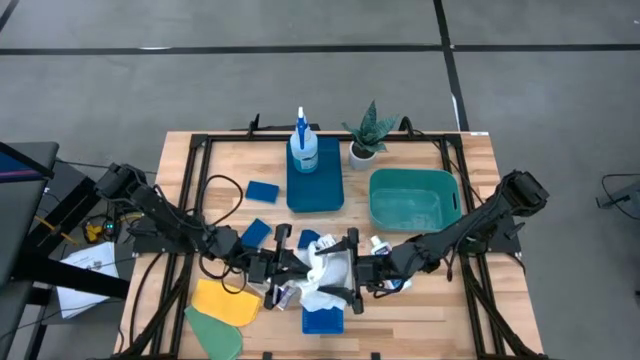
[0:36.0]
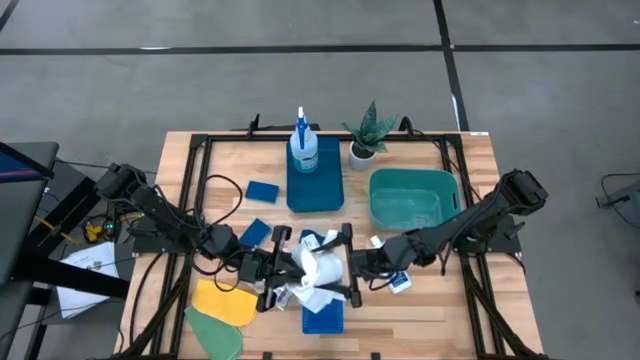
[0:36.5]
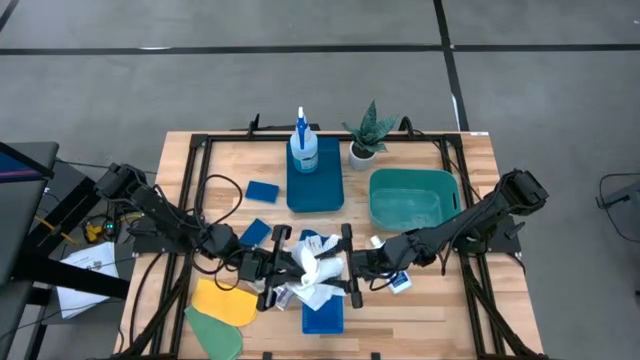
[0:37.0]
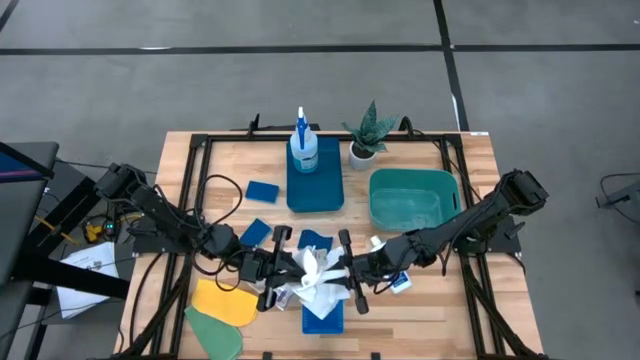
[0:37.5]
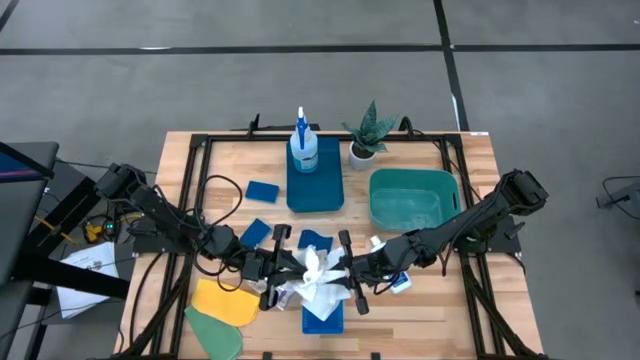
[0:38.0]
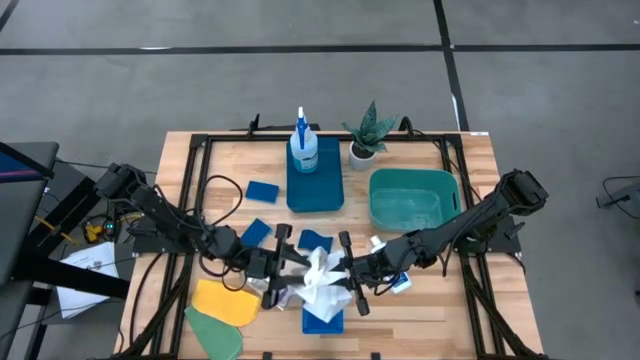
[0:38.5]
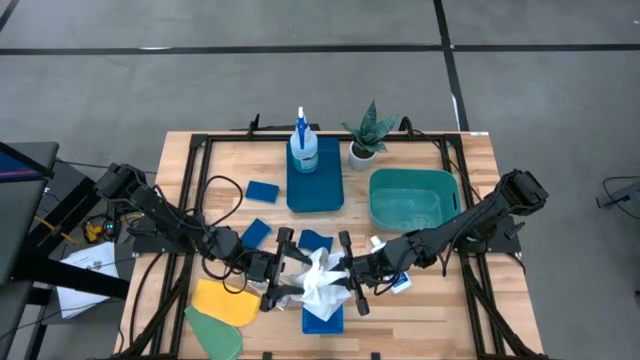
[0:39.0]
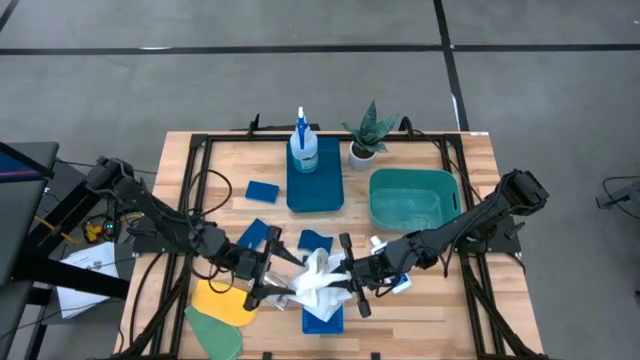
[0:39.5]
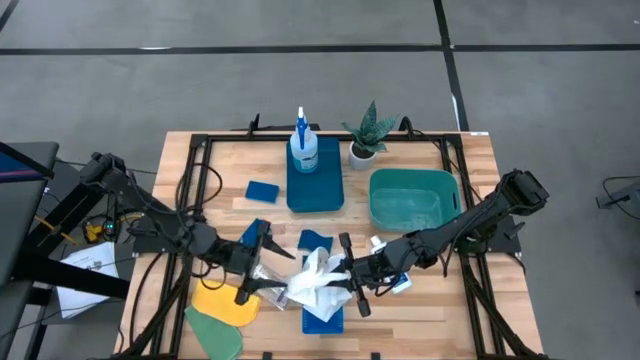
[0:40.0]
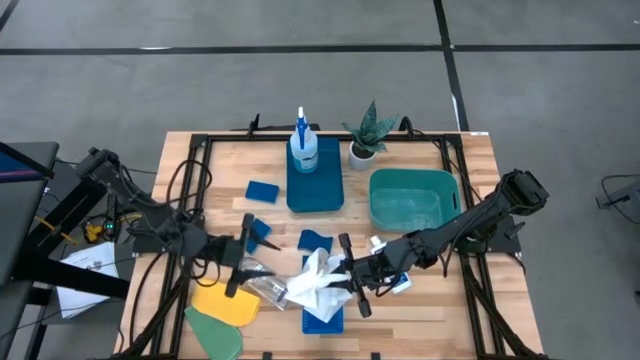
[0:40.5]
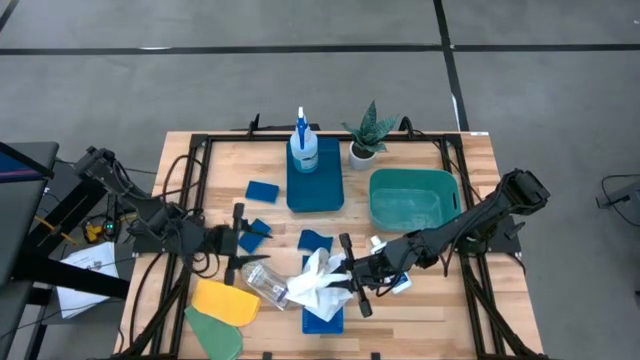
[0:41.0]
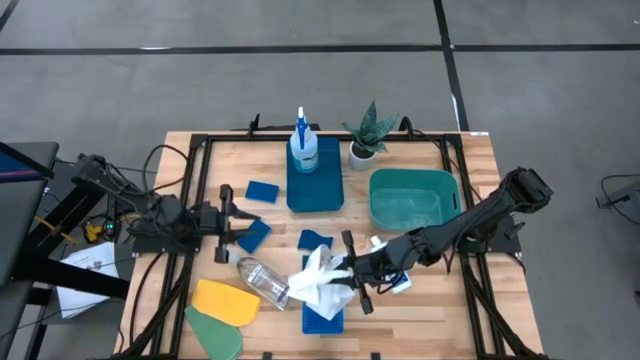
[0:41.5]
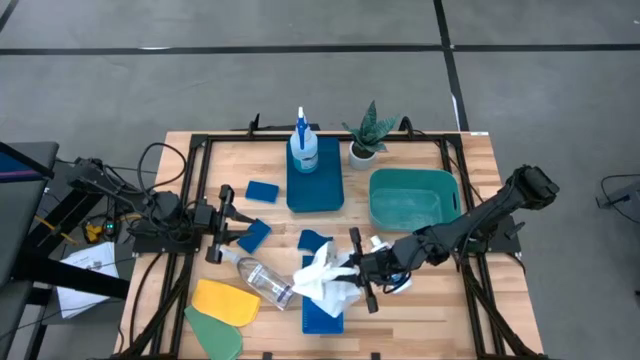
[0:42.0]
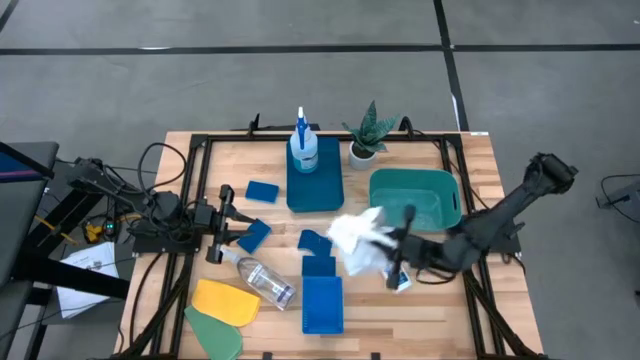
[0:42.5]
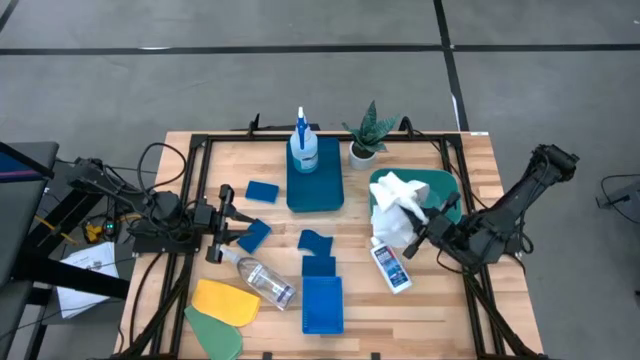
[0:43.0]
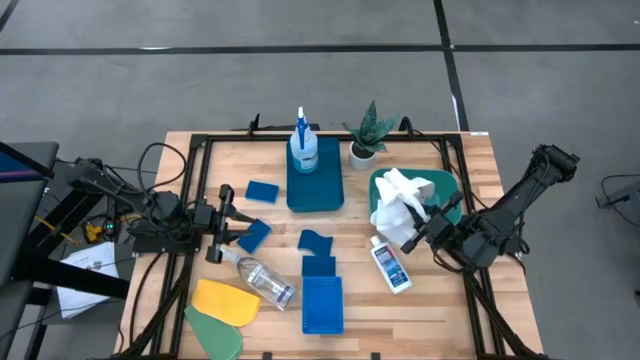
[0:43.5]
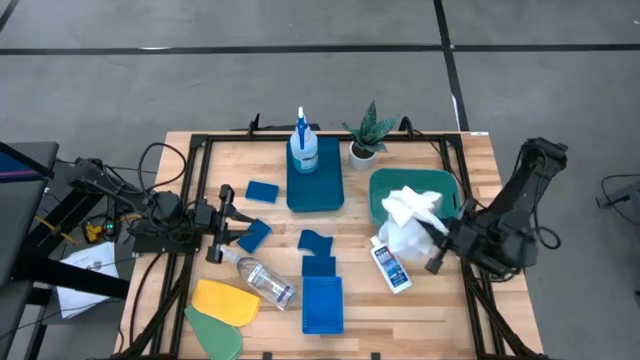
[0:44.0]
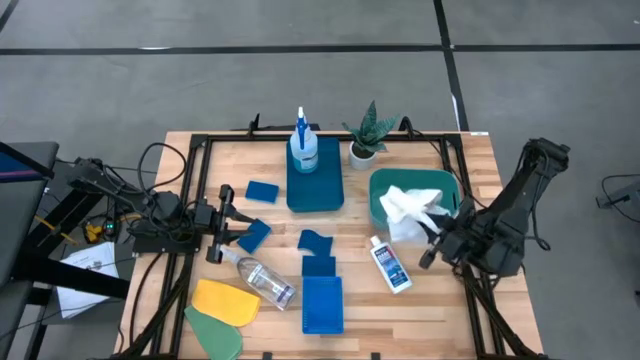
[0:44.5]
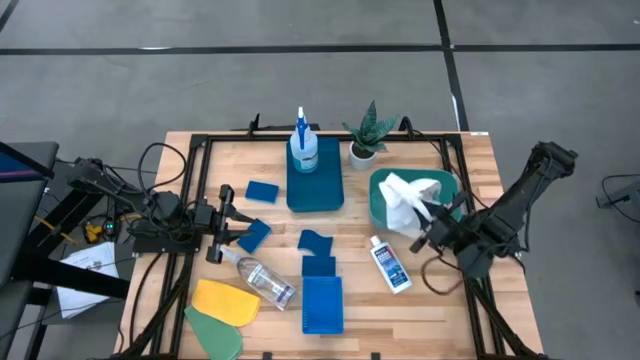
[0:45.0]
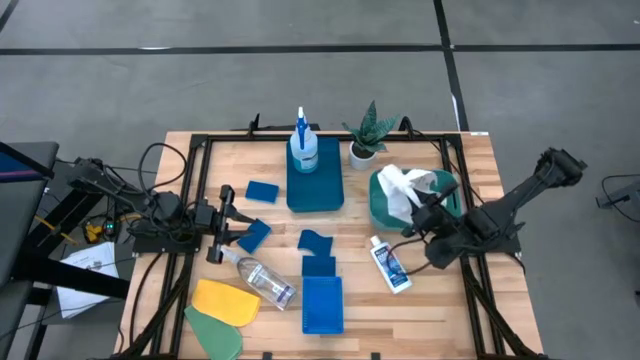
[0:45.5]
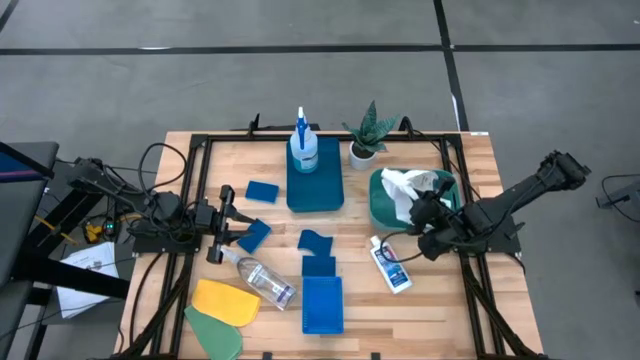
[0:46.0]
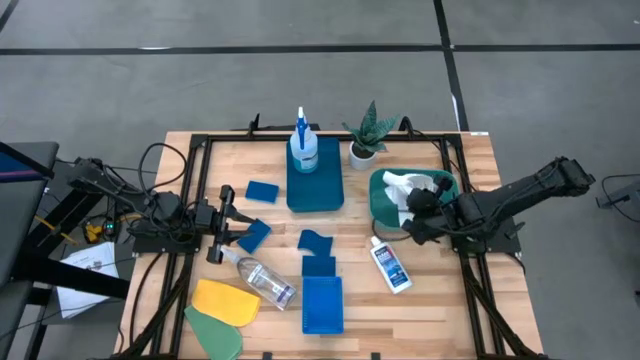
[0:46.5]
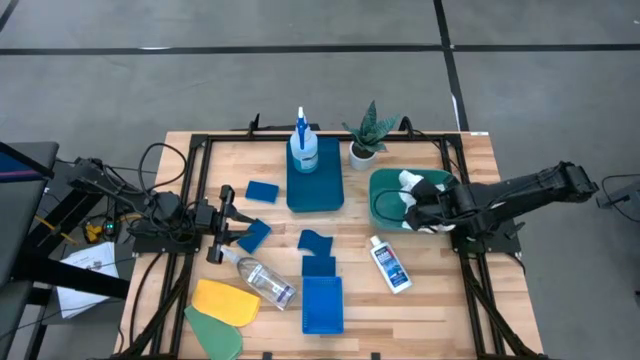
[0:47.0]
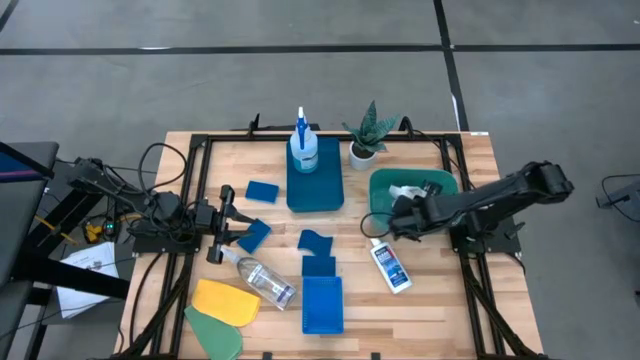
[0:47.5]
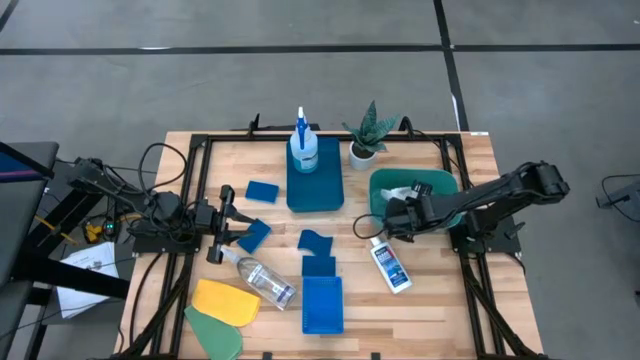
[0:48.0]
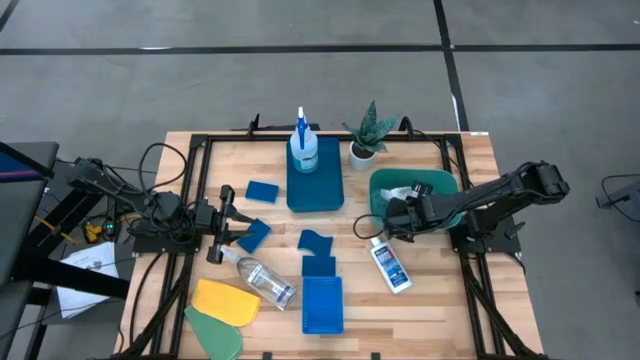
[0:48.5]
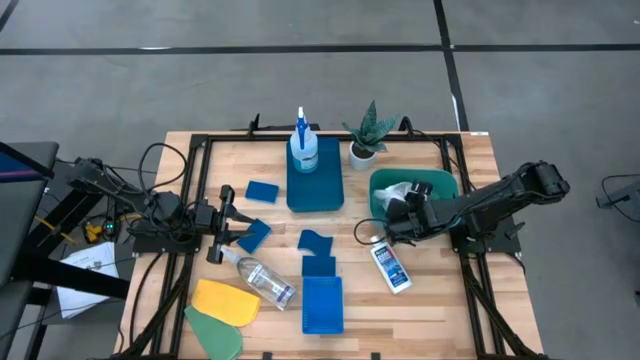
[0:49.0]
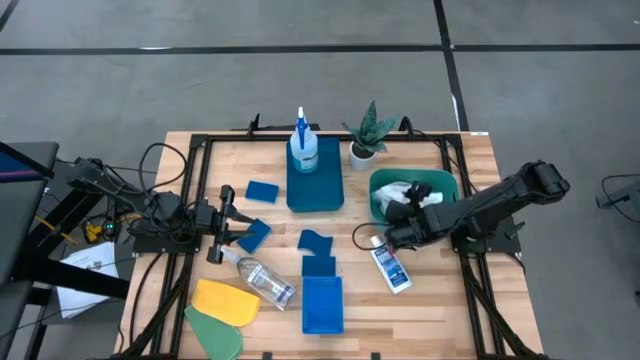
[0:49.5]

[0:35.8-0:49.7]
Task: Pick & Place Kitchen Items
Put the white microfiber towel into the green bin

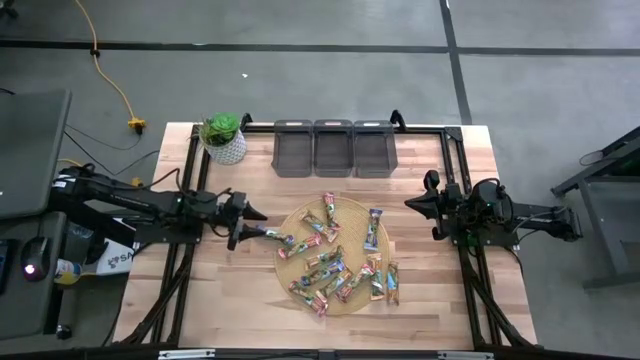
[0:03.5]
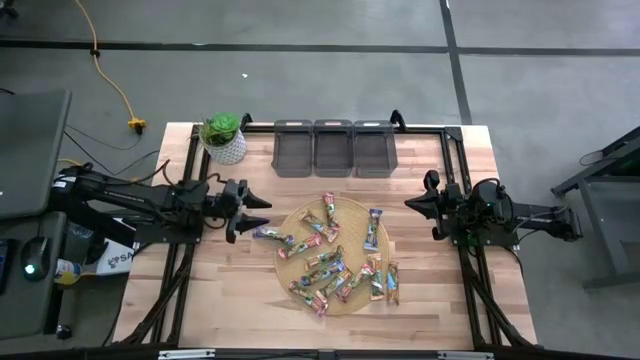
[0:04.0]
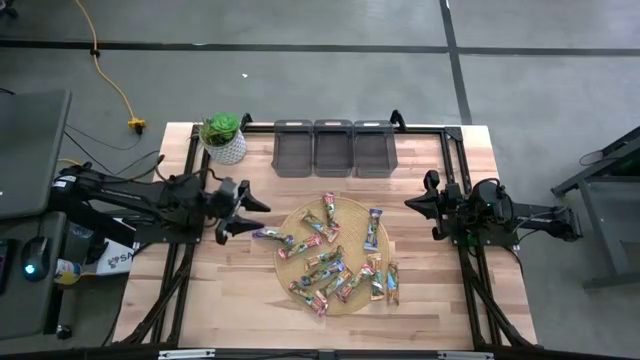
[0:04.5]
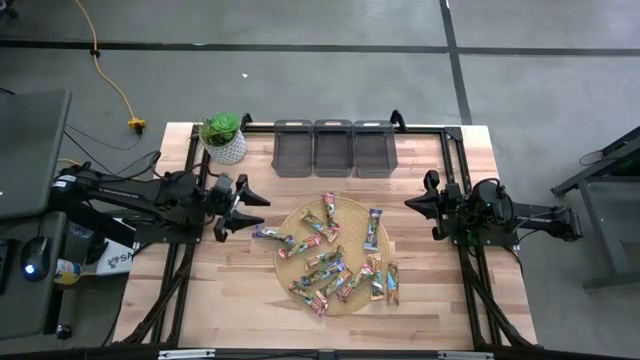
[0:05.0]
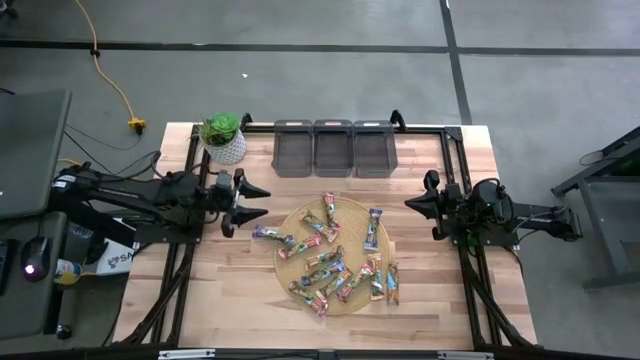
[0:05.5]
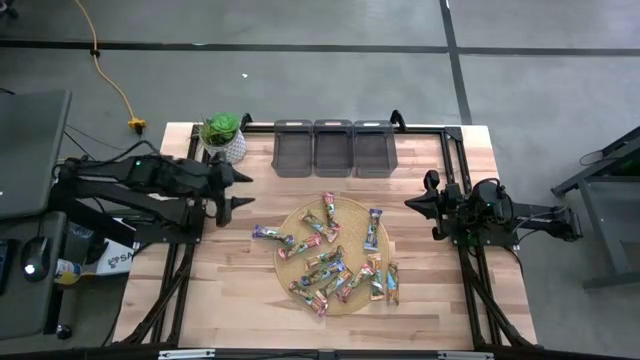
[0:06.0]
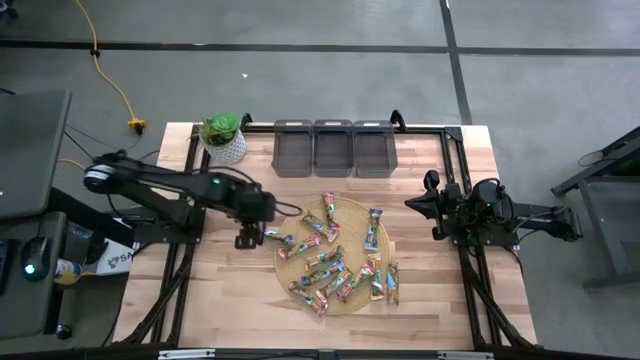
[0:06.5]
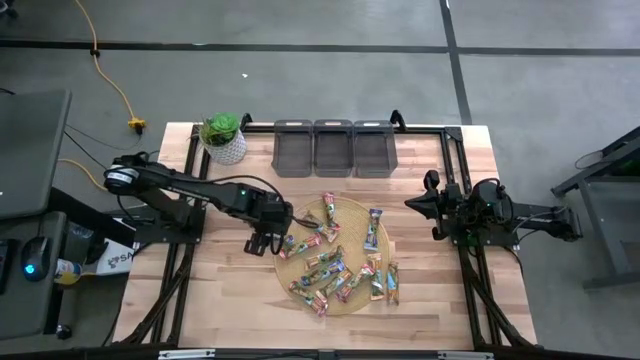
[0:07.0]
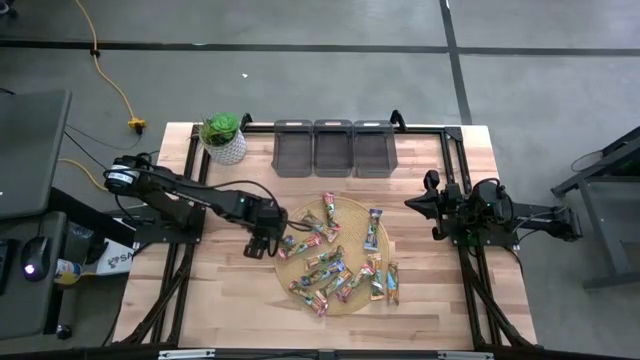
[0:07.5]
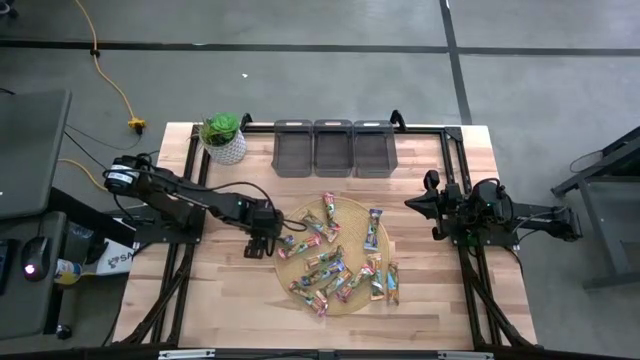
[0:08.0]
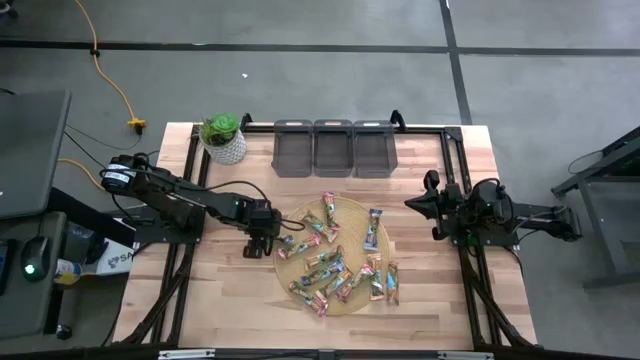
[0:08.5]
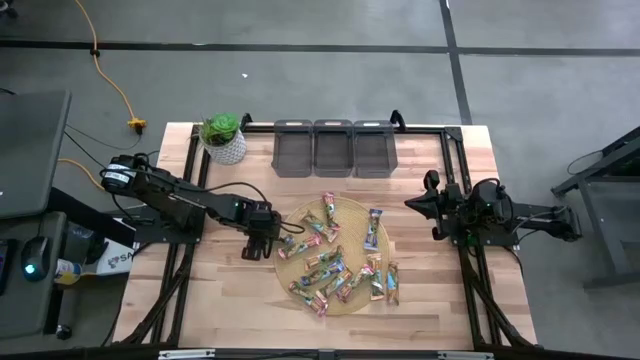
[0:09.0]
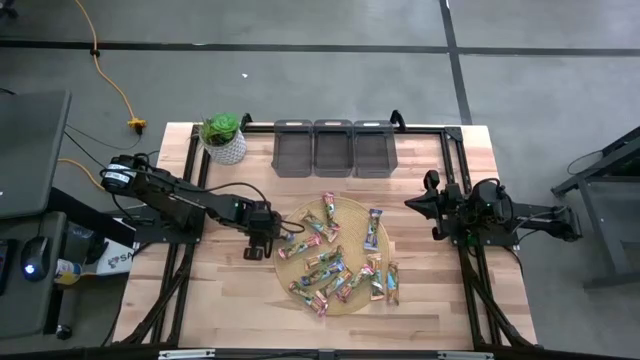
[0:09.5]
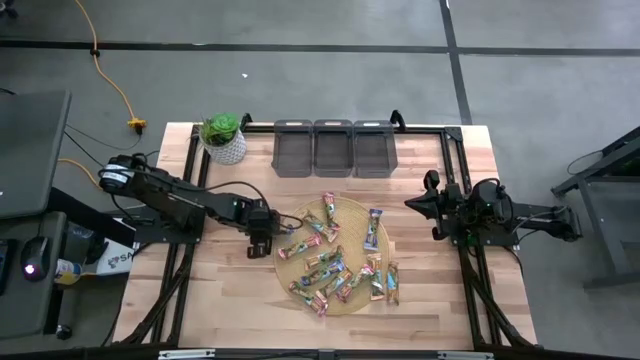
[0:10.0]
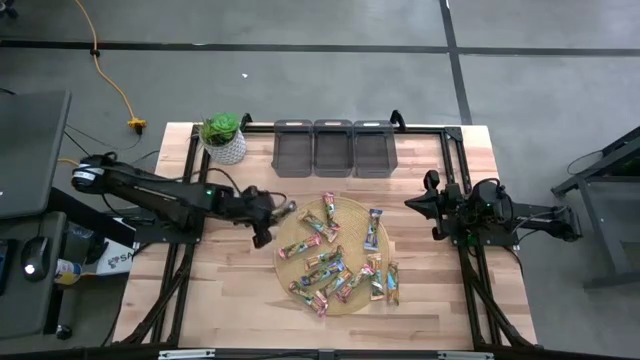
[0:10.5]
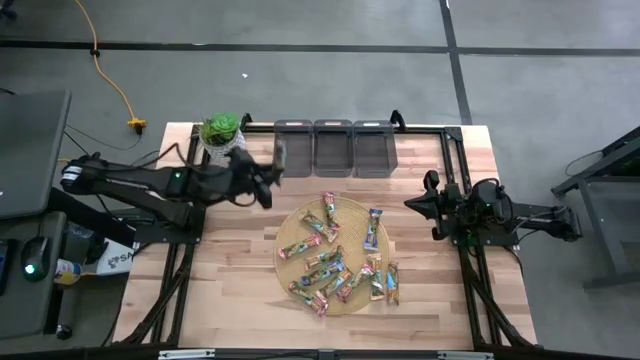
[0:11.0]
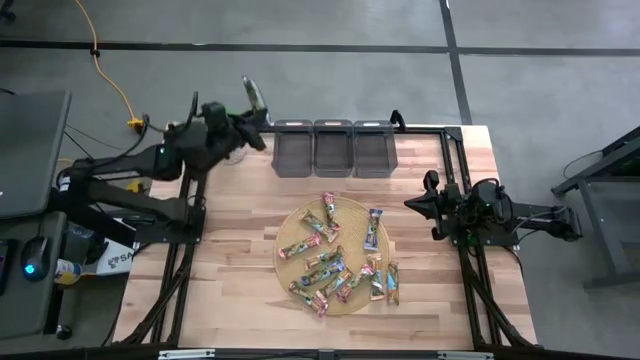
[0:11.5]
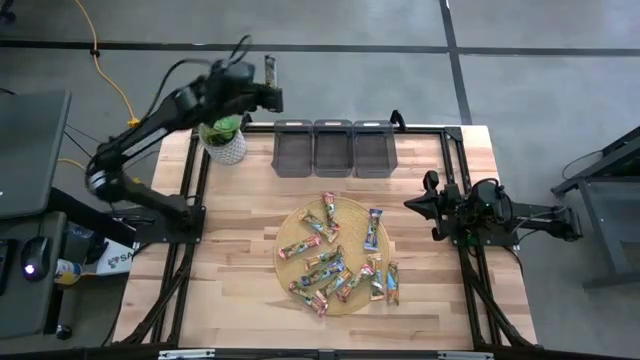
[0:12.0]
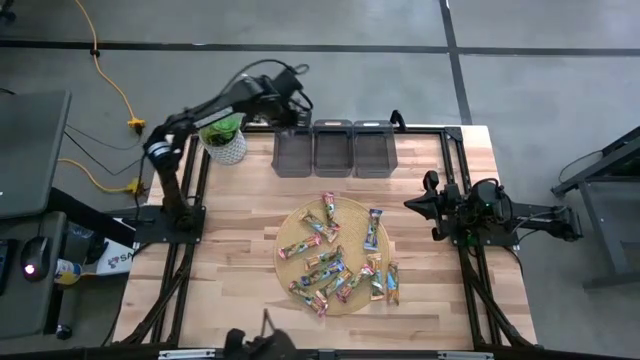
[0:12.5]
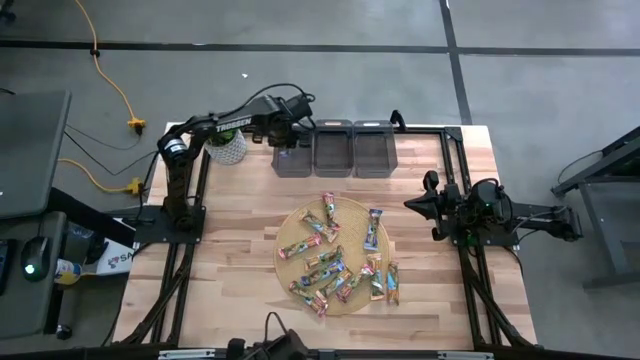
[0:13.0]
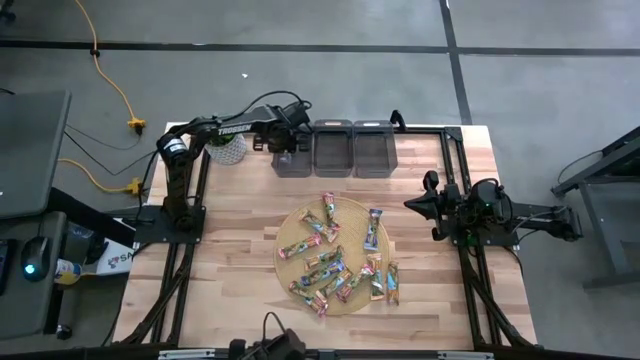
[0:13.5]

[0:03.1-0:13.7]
Task: Pick and place Granola Bars by type
Put the blue granola bar into the left black bin
